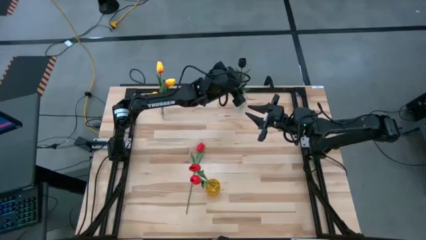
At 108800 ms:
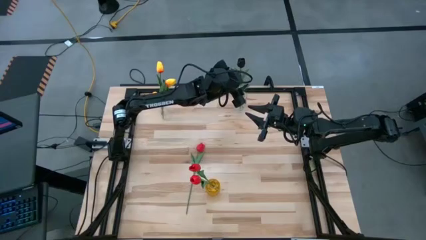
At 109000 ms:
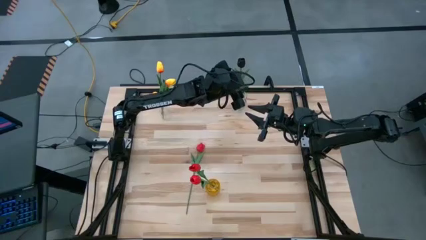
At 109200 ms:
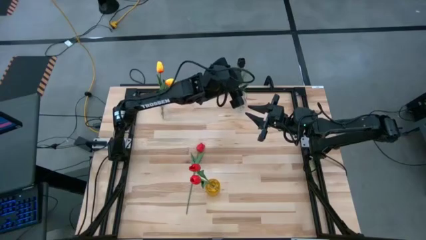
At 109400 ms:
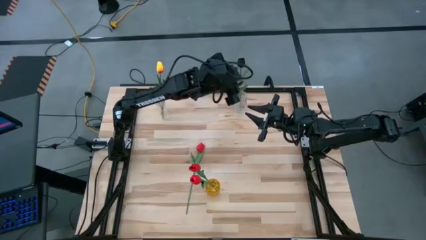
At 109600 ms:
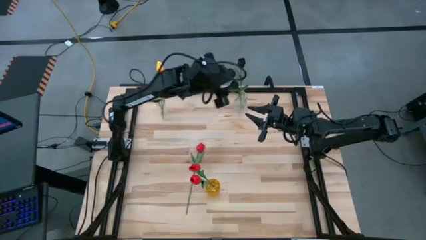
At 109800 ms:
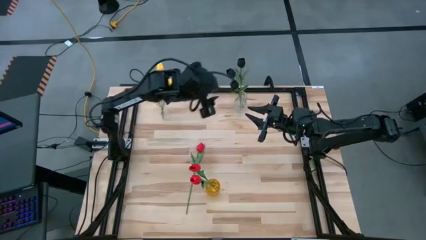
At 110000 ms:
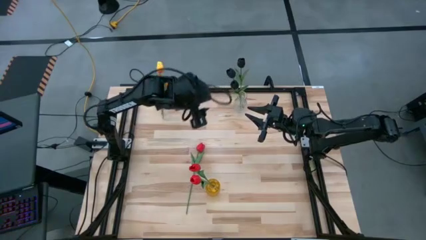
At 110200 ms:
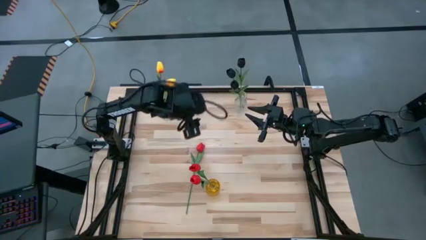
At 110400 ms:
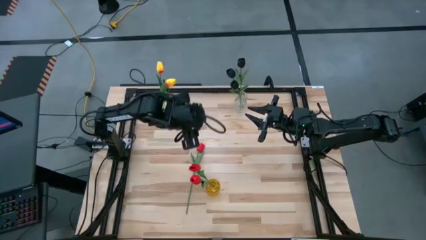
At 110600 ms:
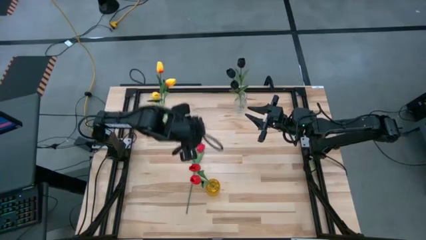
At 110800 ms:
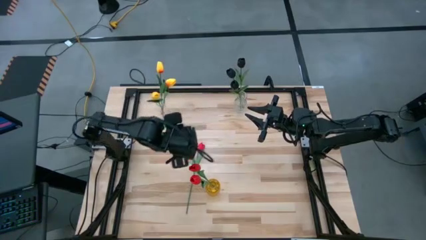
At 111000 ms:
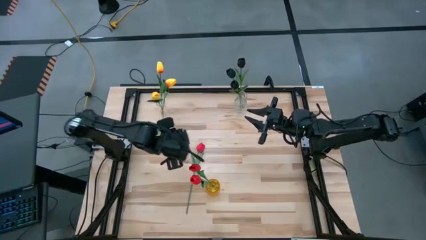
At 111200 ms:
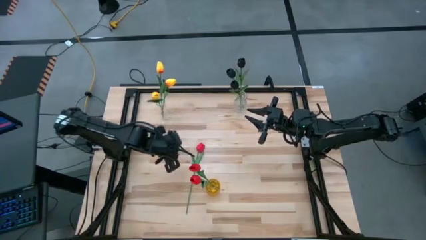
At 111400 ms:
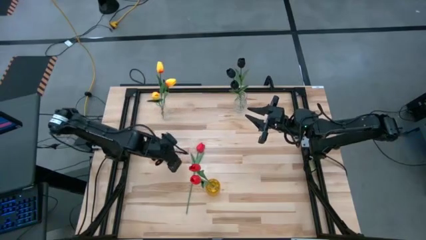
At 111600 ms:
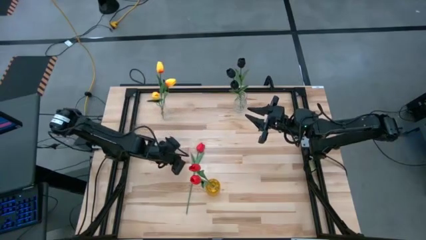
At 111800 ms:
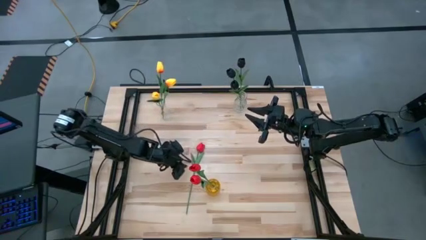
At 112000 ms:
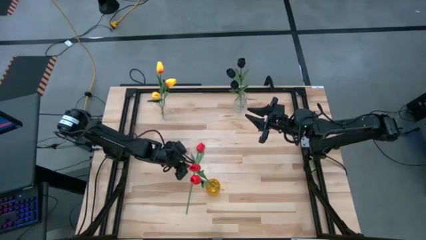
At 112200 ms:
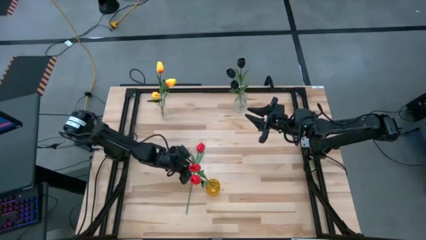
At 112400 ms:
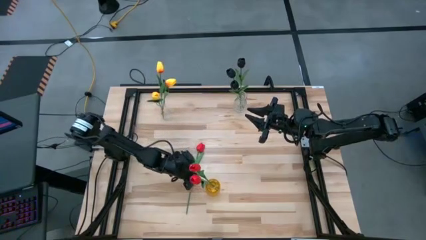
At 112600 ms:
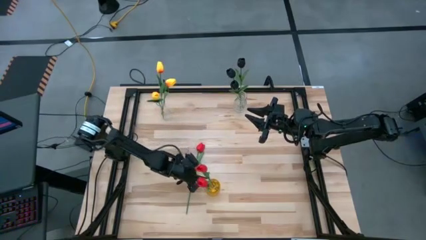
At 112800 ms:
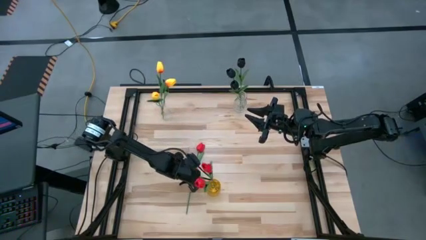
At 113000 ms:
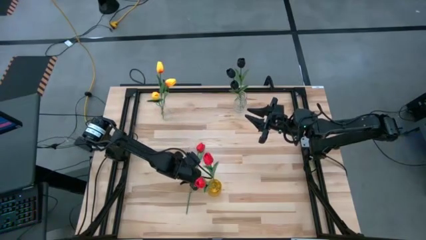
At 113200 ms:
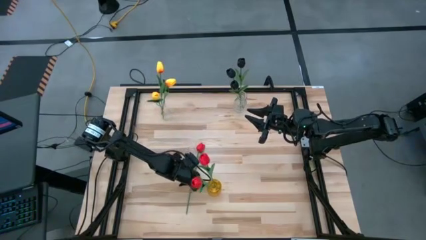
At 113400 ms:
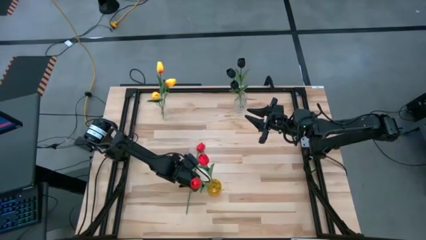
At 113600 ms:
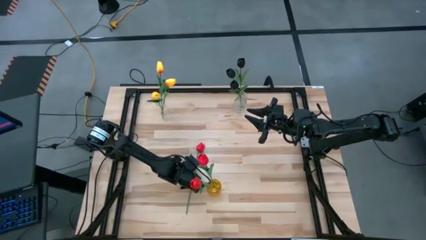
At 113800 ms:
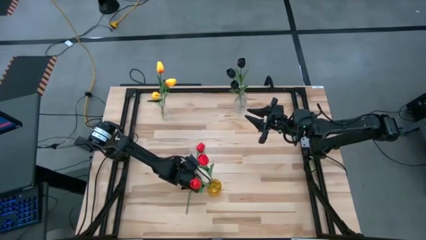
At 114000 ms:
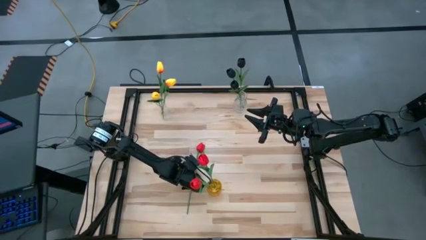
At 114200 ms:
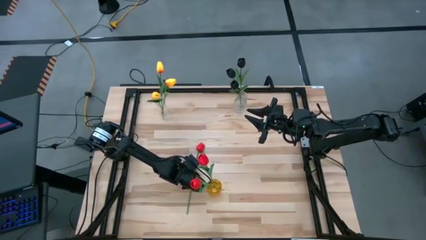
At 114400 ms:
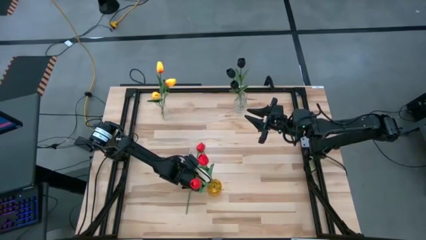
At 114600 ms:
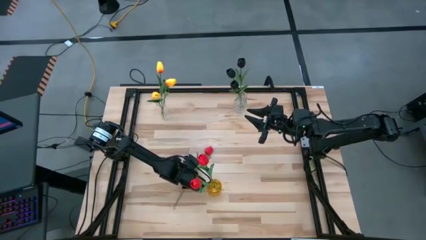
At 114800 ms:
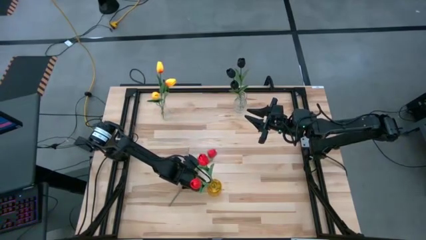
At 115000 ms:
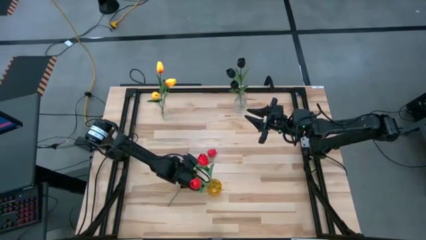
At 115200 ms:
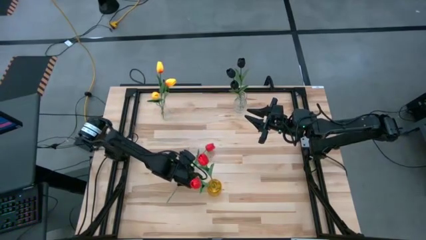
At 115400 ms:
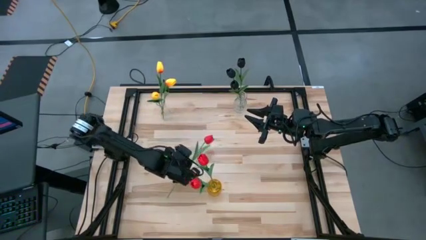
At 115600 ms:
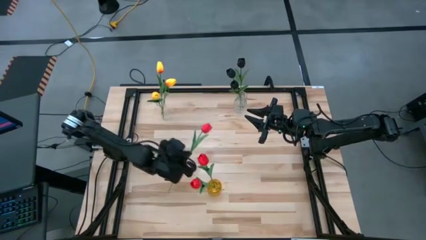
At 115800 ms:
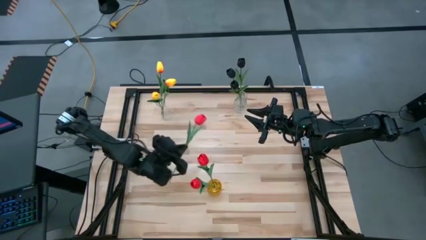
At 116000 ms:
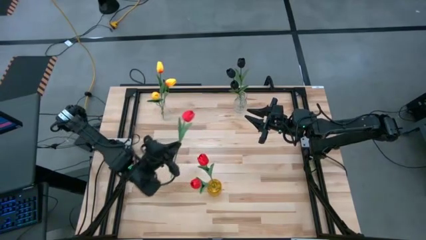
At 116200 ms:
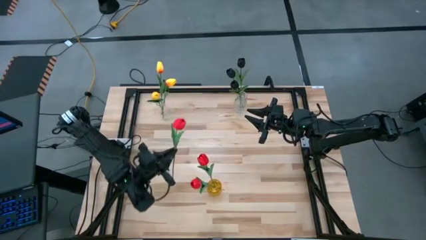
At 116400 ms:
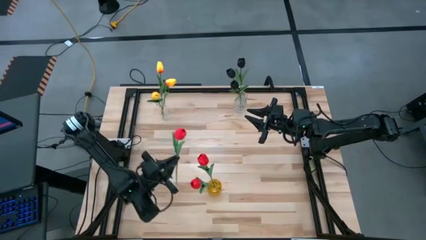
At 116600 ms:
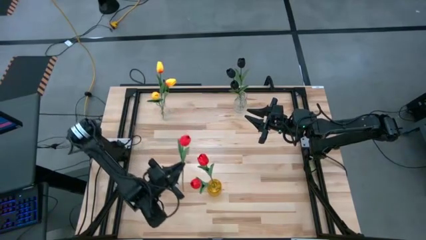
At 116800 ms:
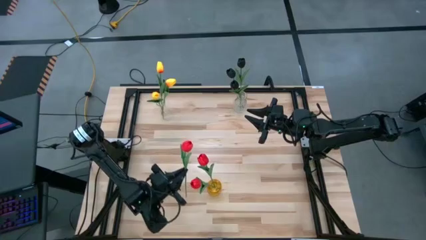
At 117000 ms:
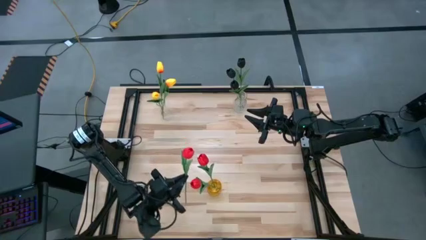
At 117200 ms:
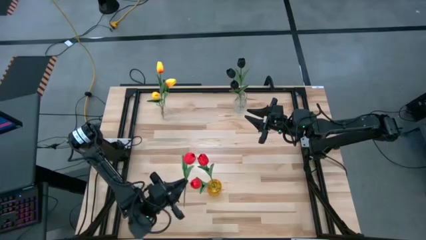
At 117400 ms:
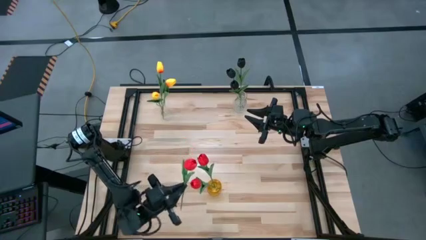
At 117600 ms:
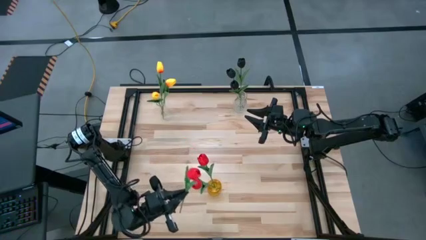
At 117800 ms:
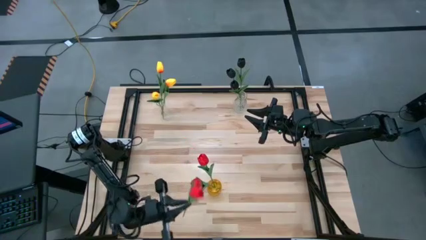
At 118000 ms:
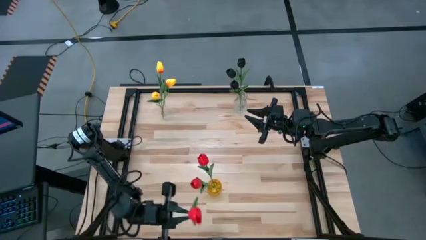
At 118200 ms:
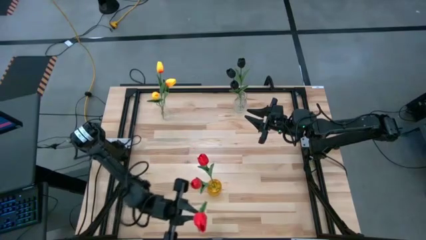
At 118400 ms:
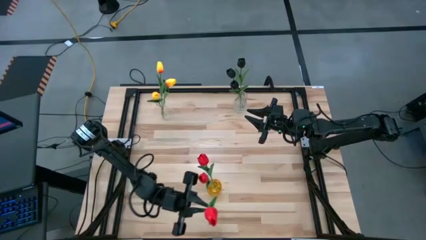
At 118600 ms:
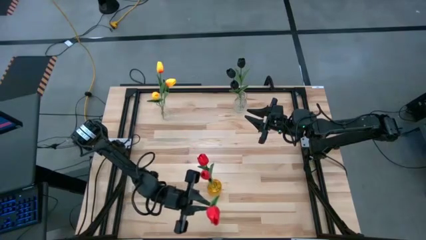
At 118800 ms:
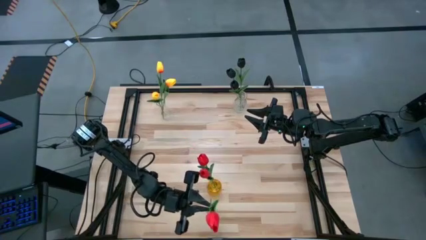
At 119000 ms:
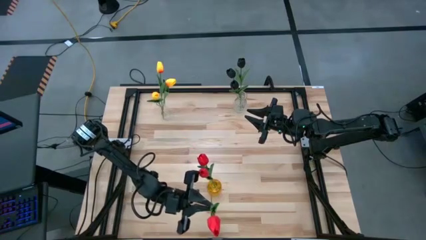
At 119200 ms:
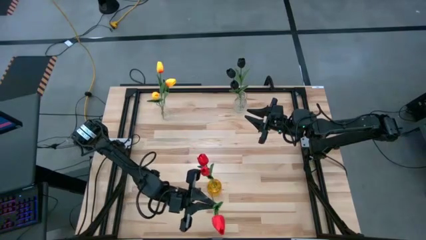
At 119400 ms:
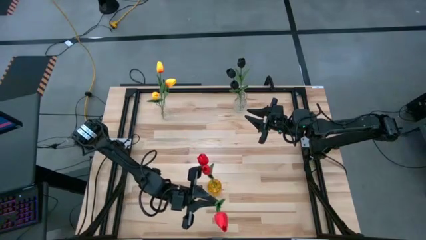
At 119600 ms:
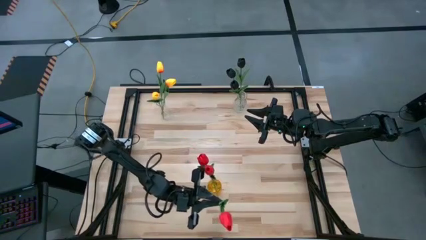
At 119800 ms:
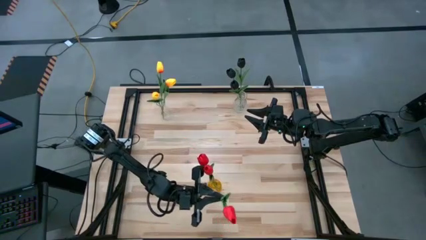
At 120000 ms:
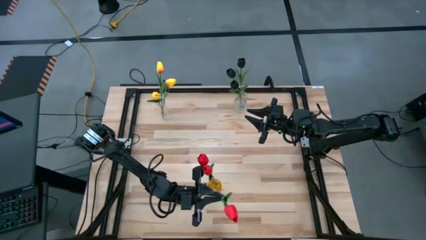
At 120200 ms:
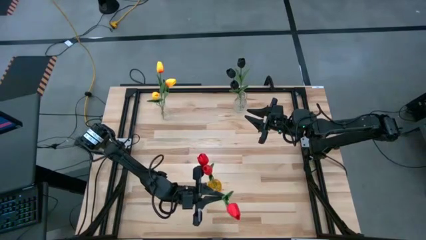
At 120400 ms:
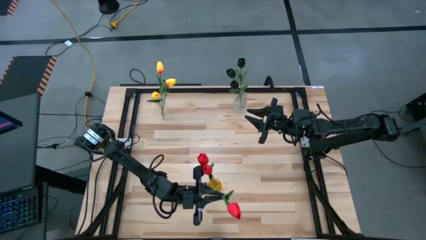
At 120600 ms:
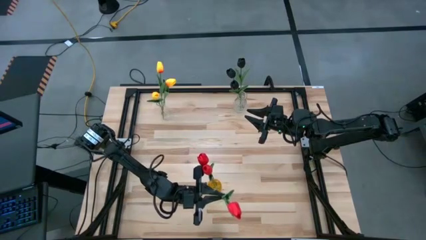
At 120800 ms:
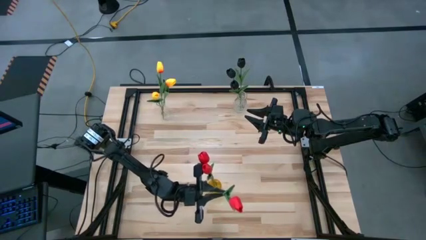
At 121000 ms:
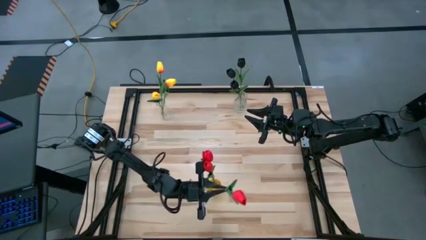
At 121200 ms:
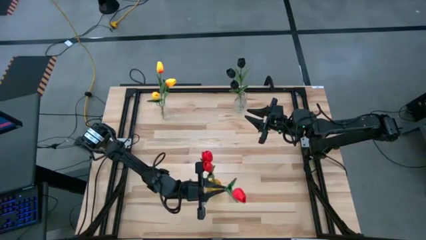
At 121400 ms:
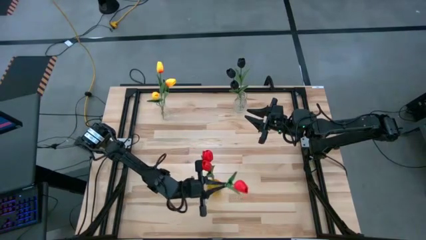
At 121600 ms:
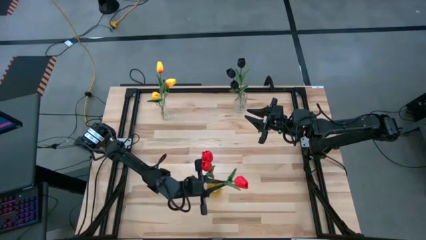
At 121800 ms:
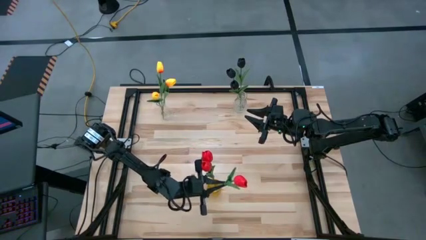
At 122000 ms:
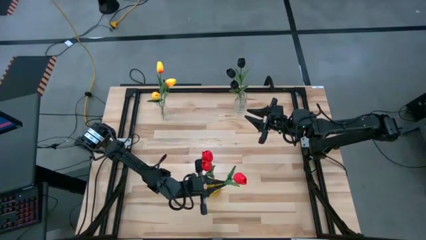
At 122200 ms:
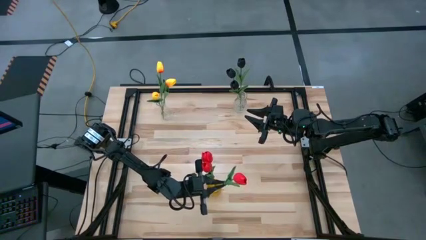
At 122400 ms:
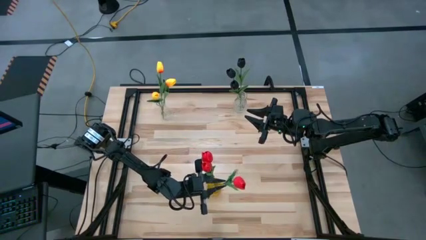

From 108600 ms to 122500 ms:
Task: Sort flowers into vase by color
Put the red flower into the yellow vase
